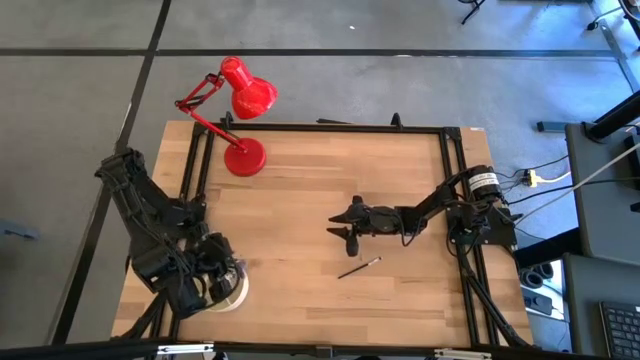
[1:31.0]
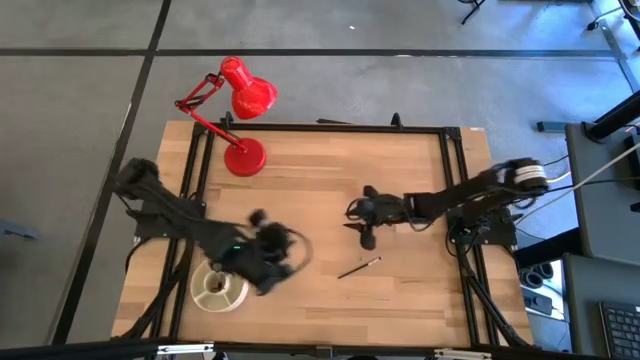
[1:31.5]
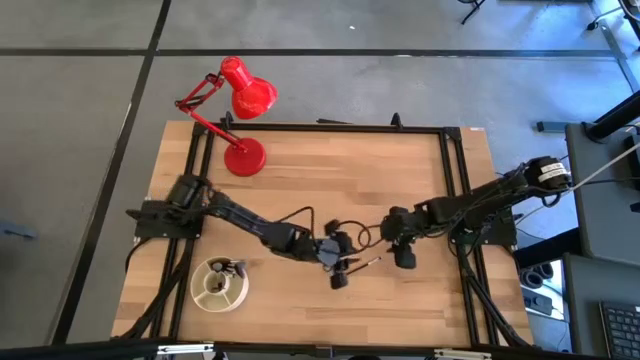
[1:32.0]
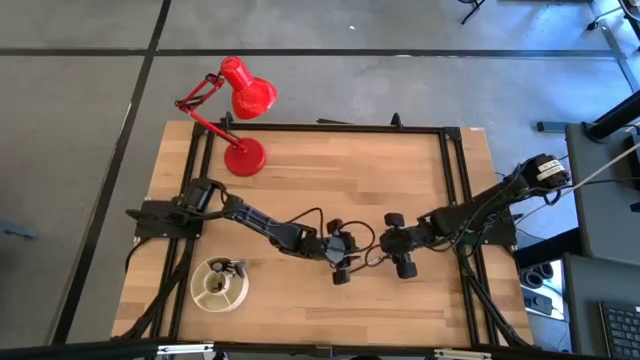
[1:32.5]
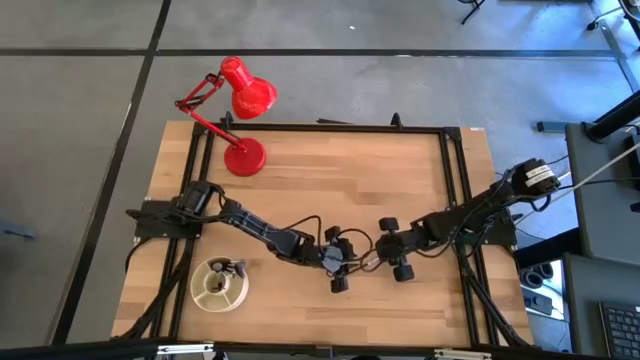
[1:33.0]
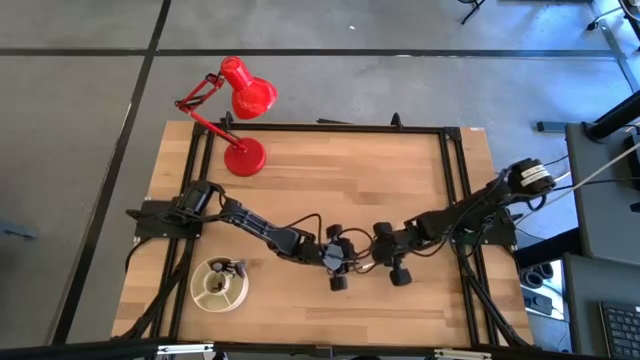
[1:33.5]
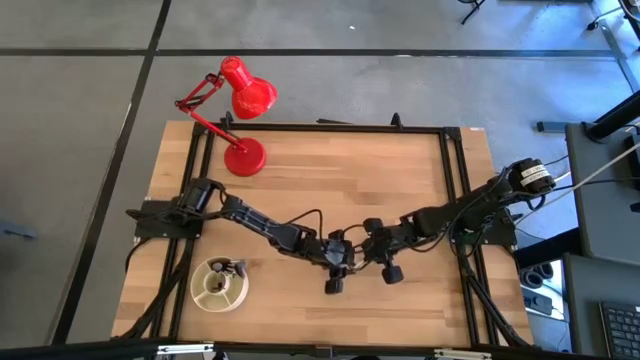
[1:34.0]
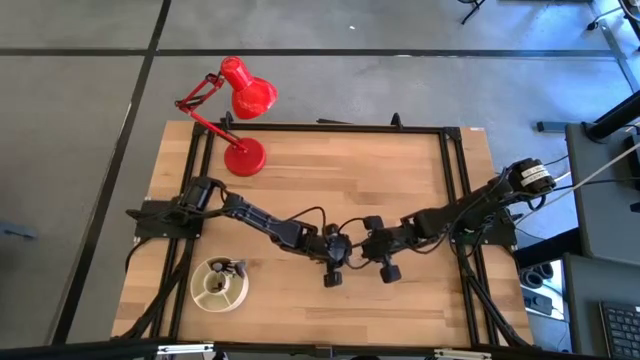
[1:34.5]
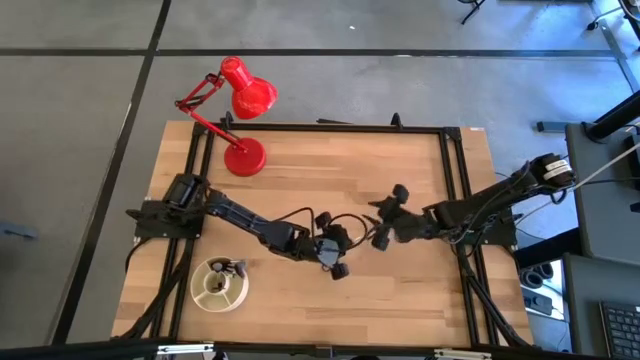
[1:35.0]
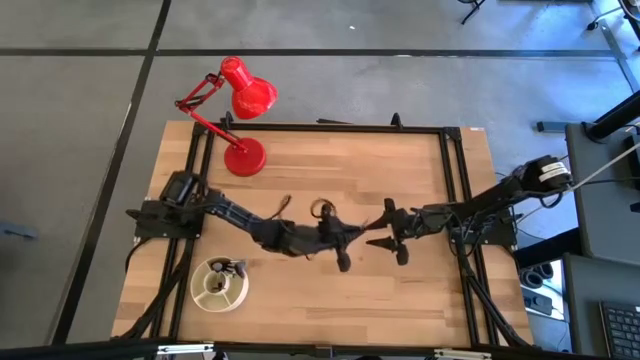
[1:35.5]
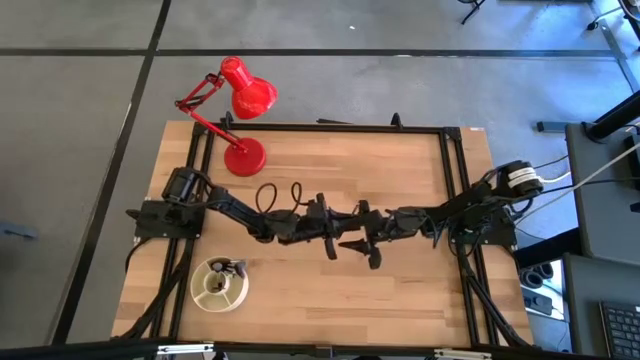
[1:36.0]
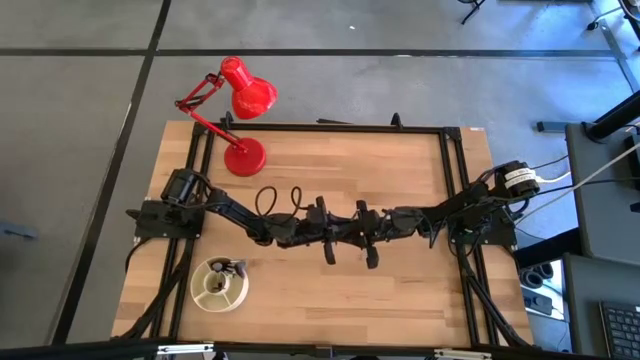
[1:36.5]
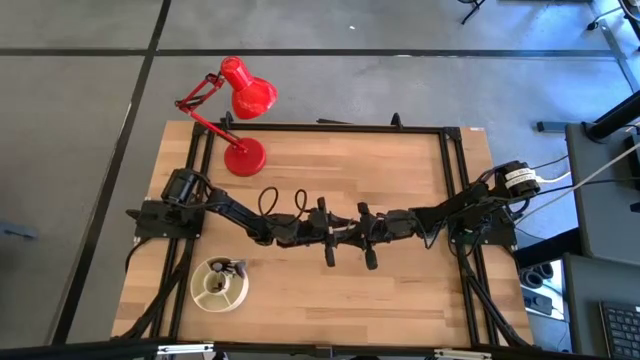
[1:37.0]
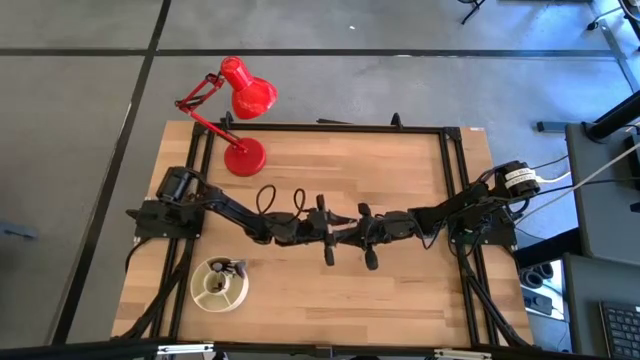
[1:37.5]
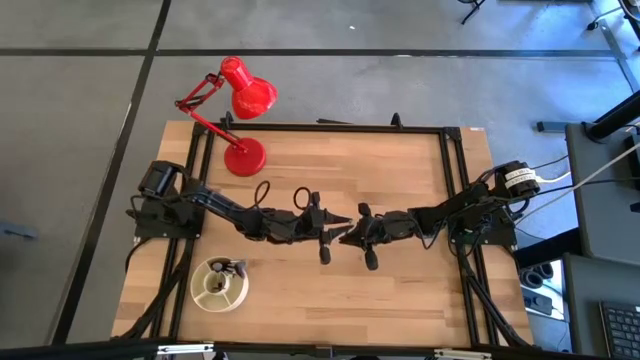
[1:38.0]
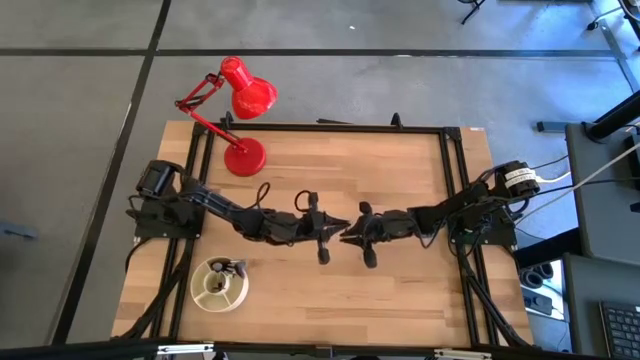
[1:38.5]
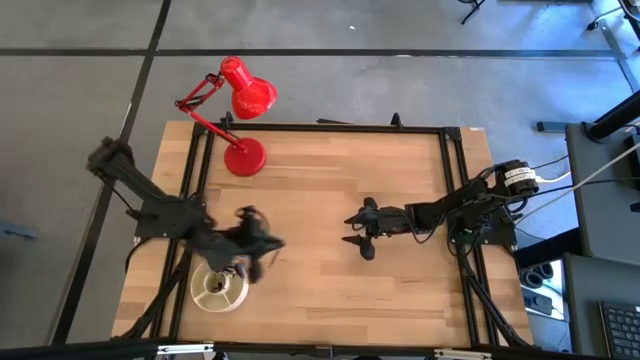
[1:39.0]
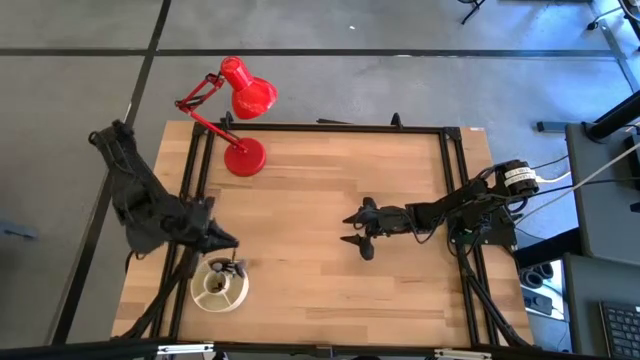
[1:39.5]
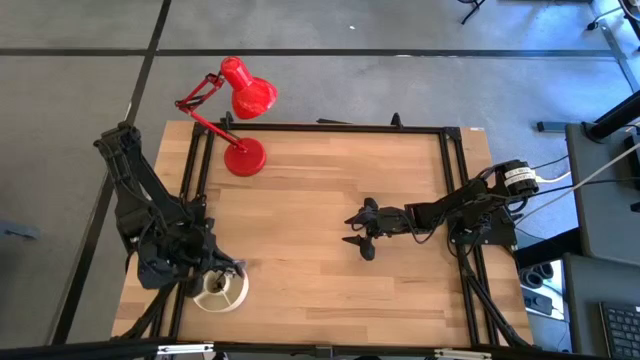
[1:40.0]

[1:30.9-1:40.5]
Task: Put items in baskets/containers
Put the black eyeshadow brush into the white organizer bin

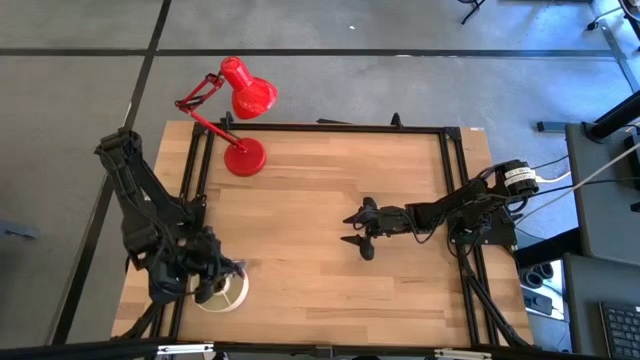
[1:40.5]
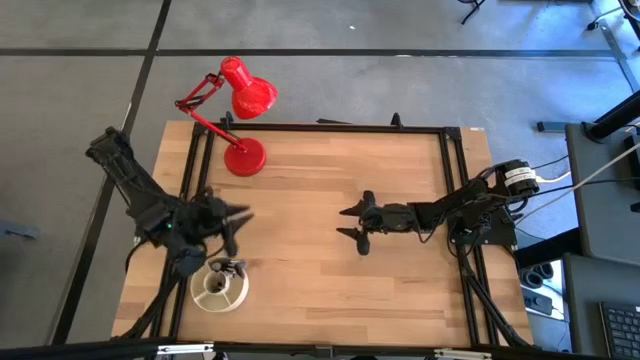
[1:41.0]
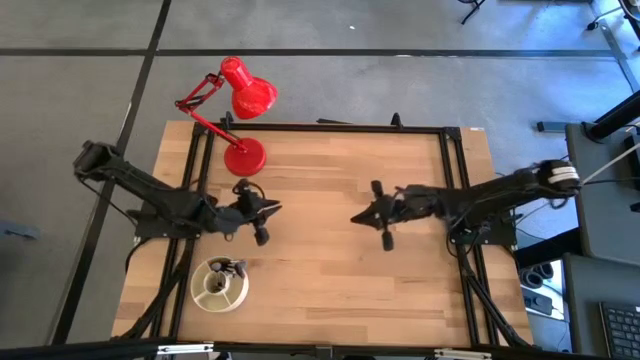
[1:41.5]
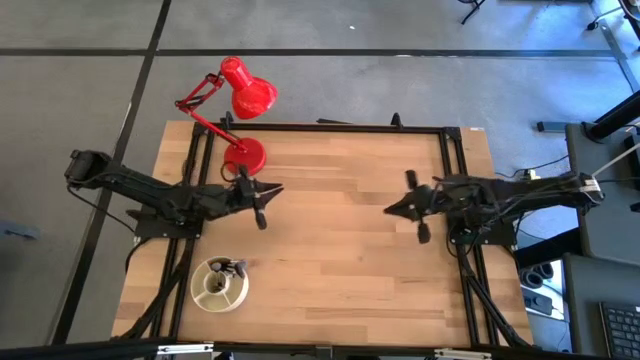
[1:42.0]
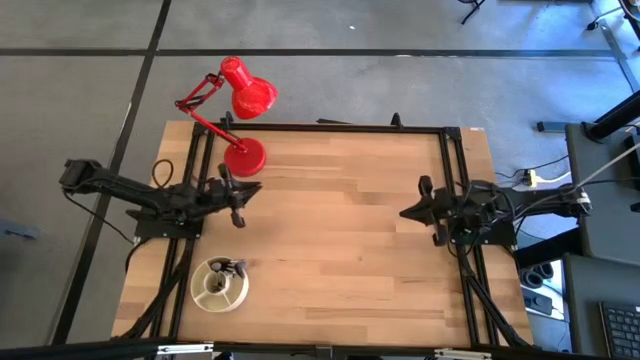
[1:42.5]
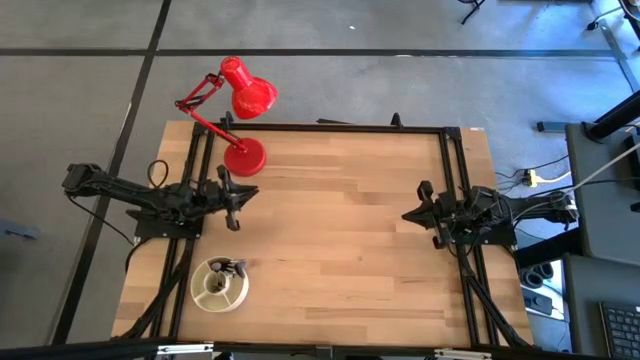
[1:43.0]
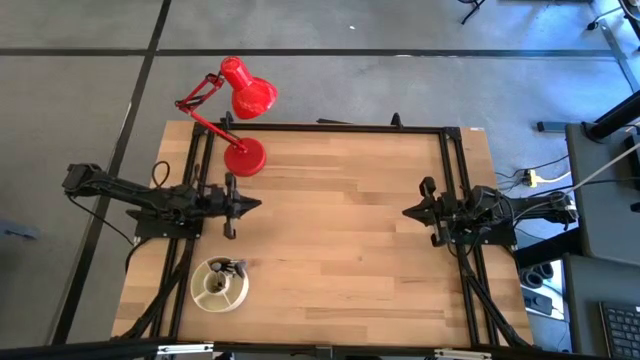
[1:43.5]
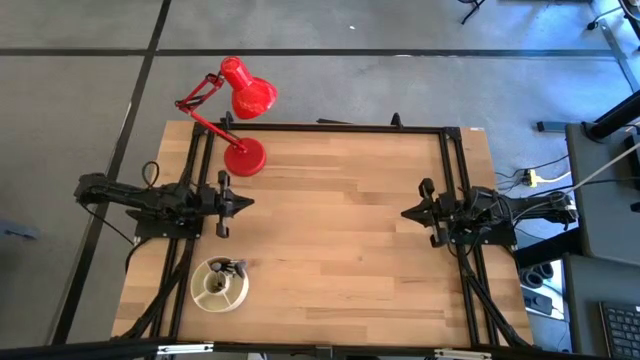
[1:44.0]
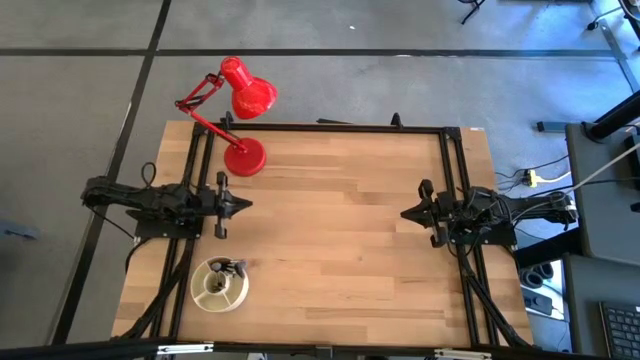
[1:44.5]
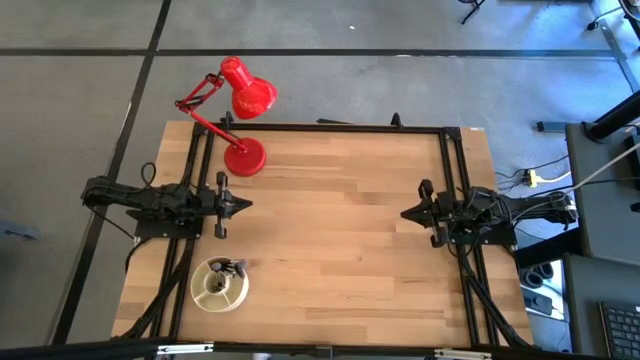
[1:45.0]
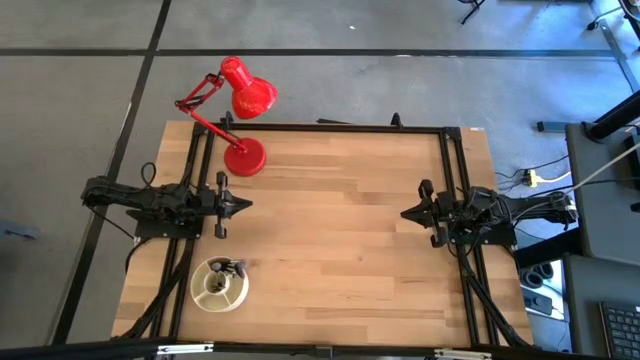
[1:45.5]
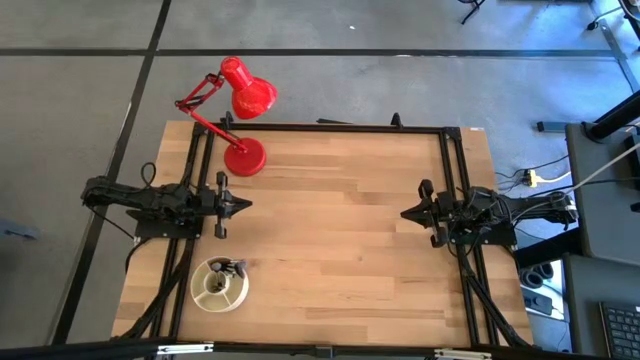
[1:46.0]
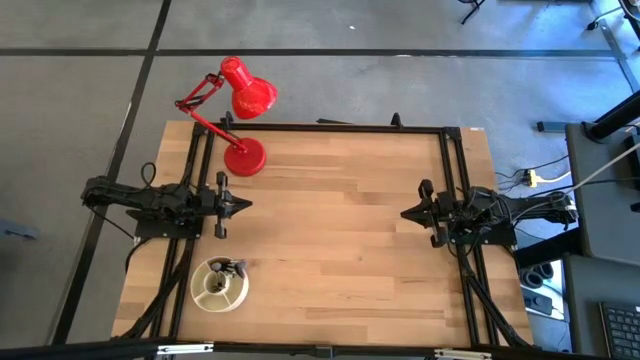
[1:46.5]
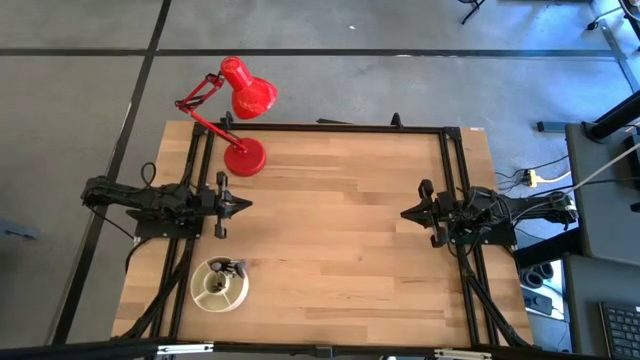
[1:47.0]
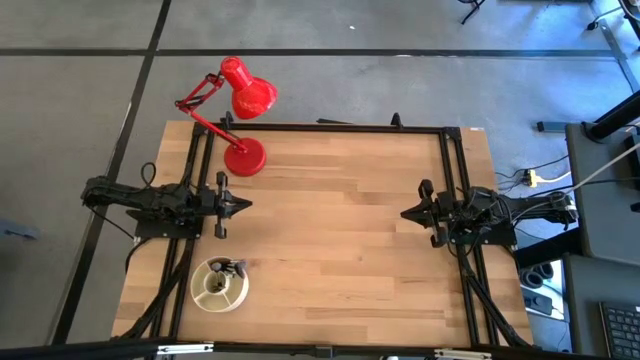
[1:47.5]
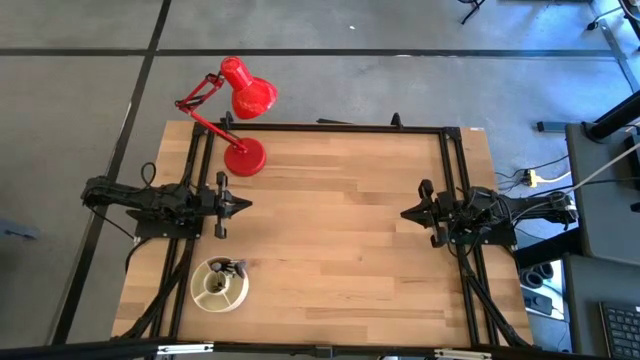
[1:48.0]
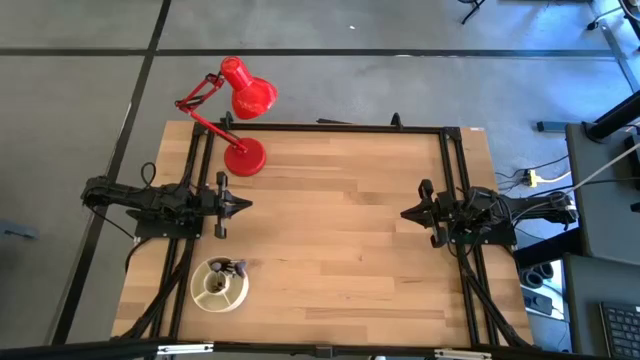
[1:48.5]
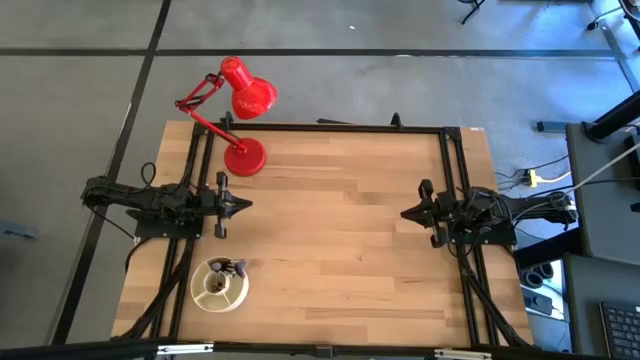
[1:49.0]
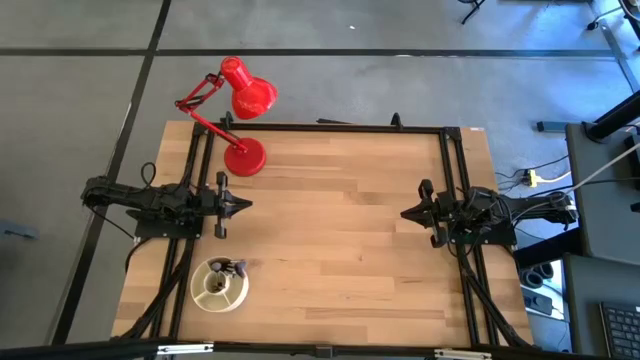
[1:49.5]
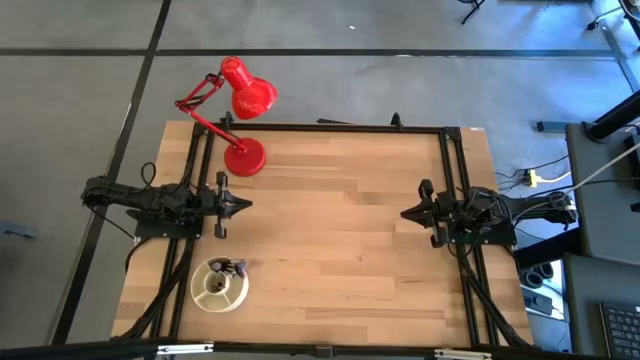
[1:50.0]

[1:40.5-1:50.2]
Return to Home Position

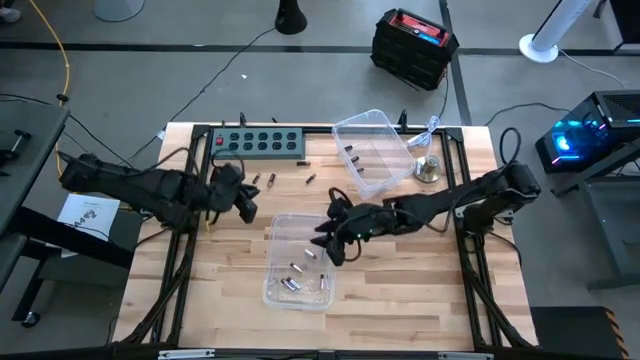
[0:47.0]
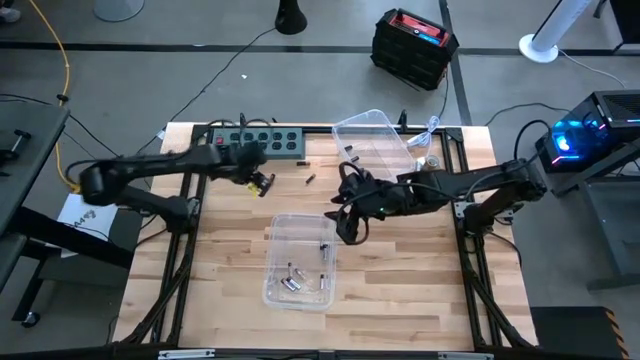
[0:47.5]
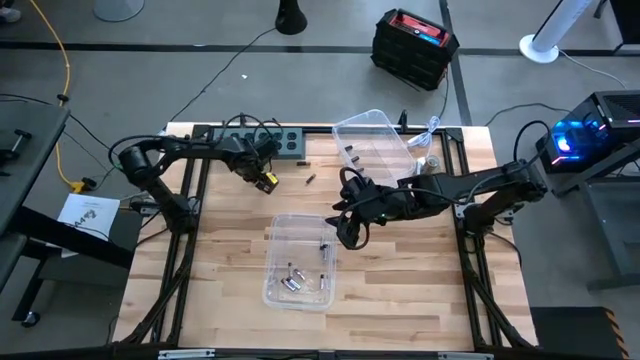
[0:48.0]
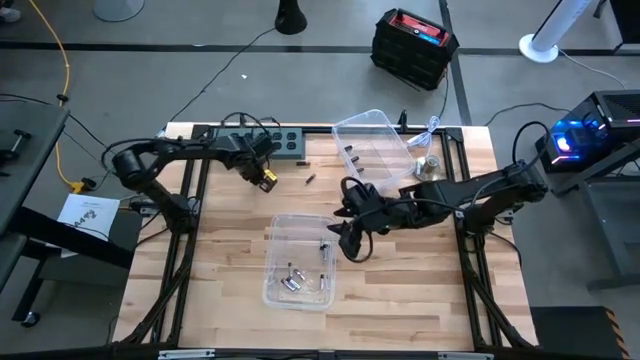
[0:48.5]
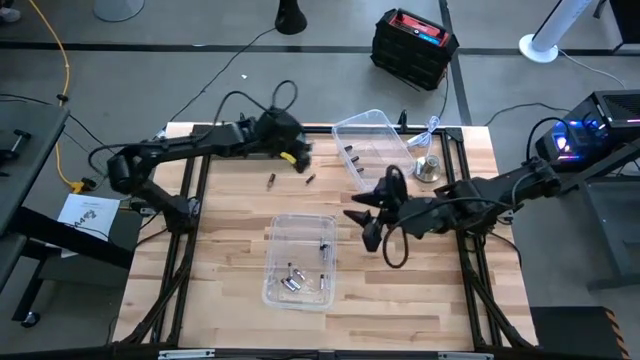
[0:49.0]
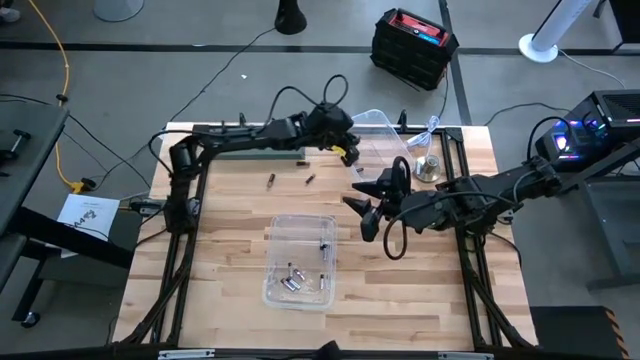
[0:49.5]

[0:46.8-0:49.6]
Task: Sort batteries
Put the black battery into the right transparent bin
